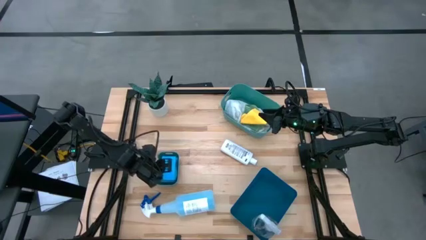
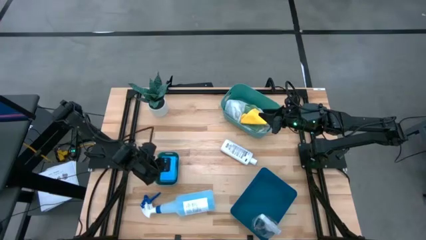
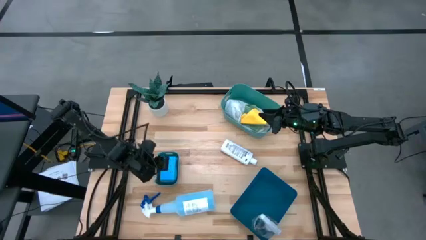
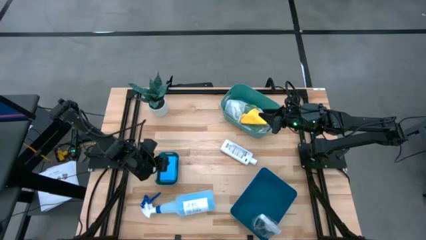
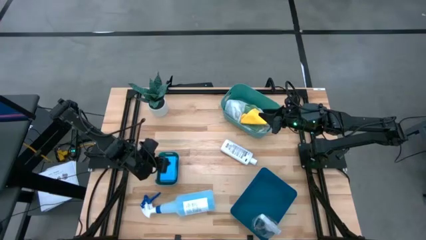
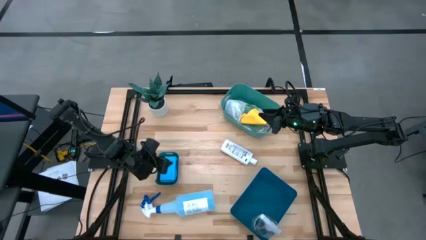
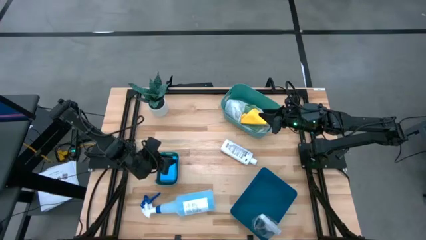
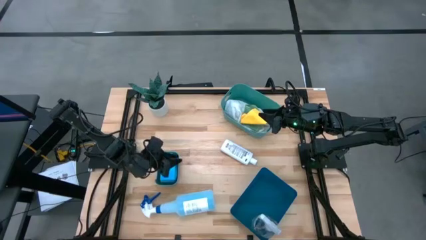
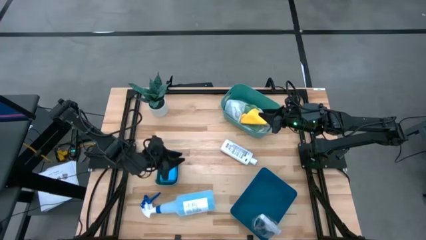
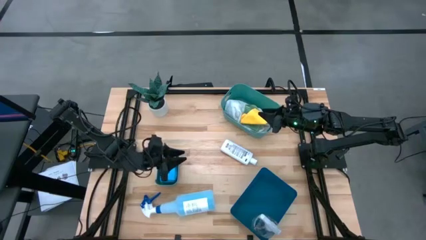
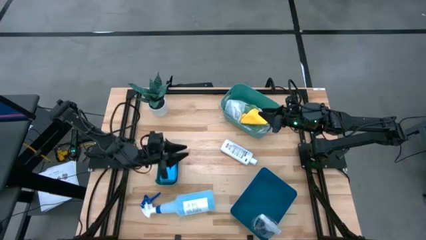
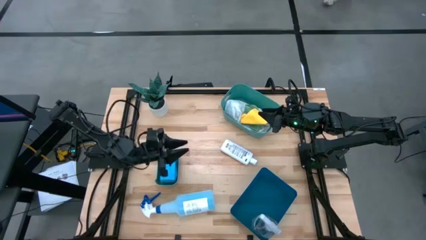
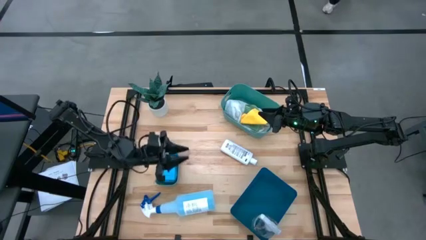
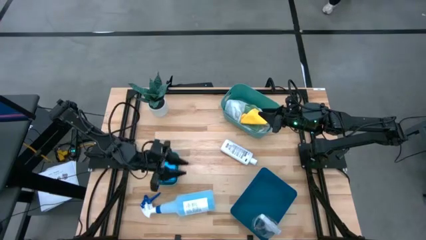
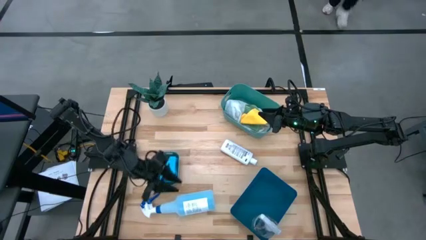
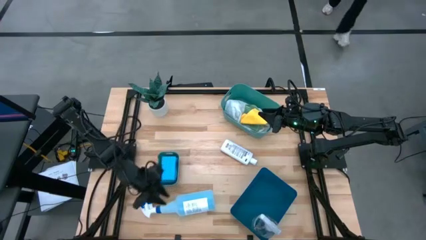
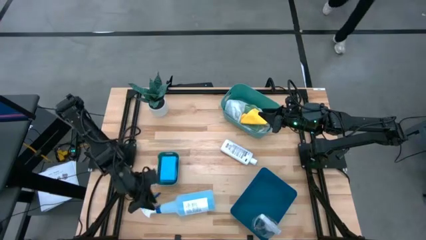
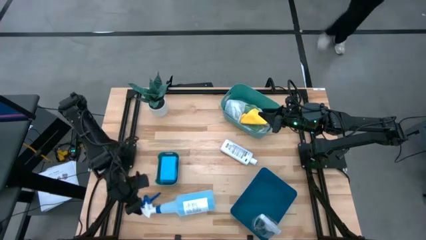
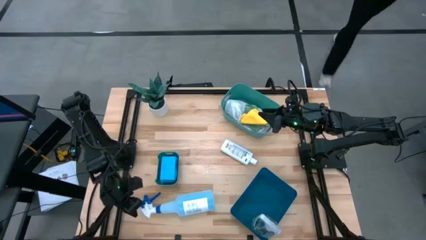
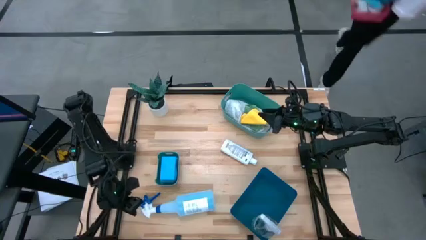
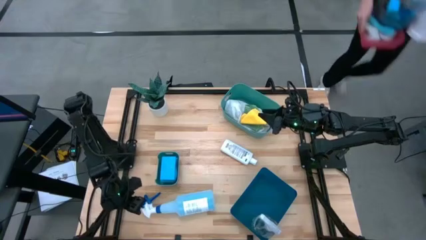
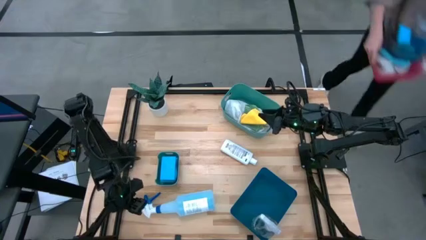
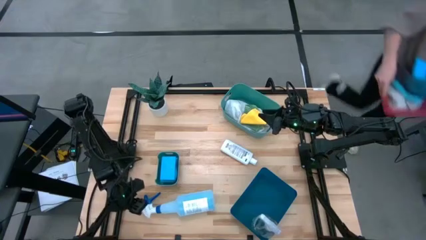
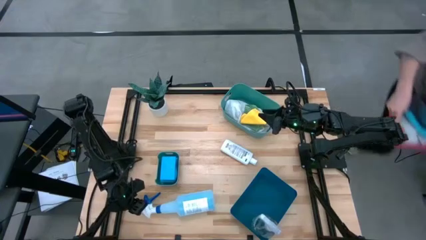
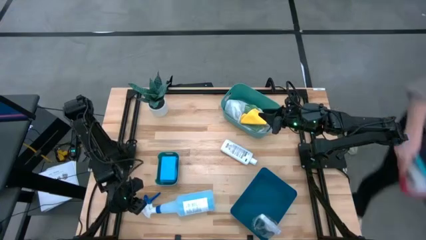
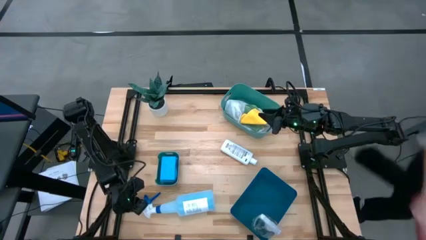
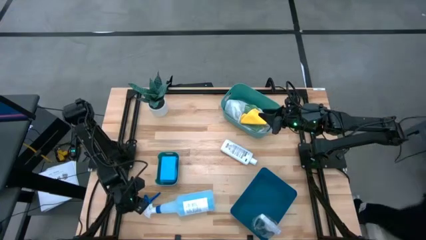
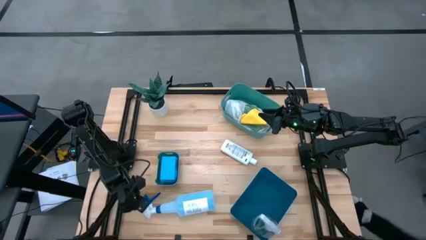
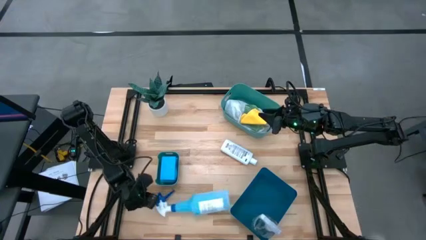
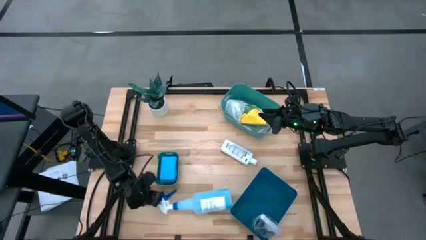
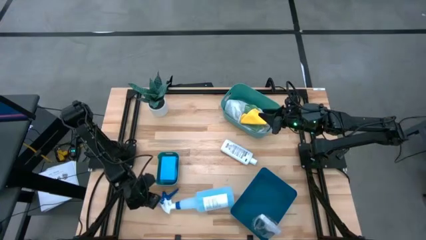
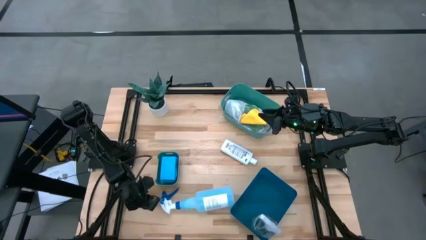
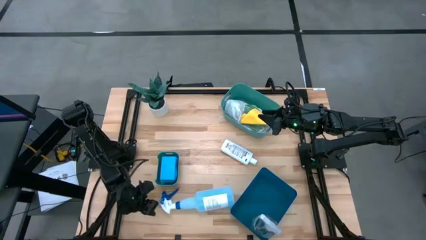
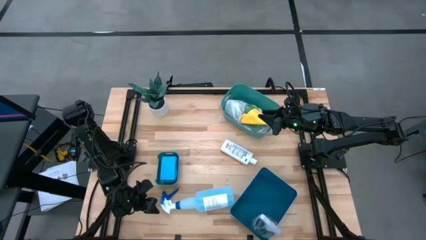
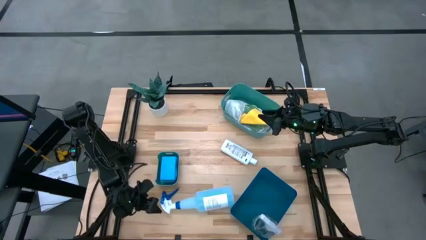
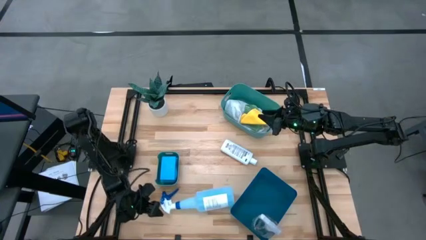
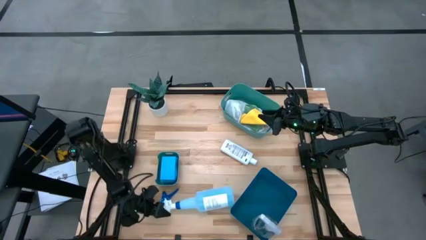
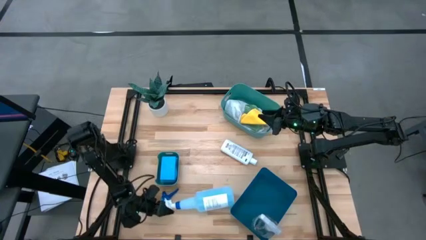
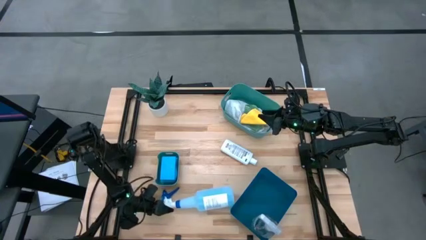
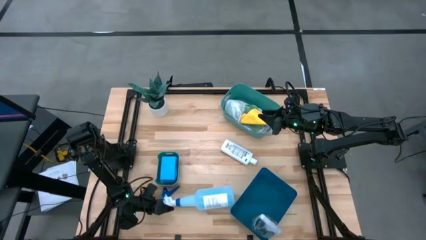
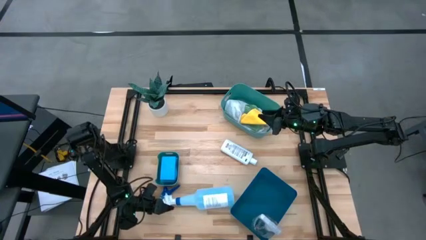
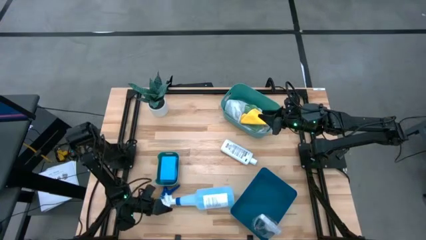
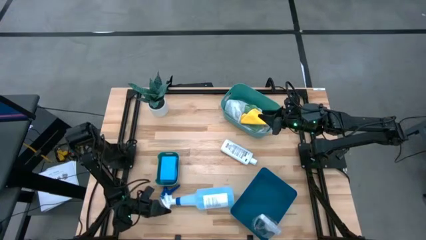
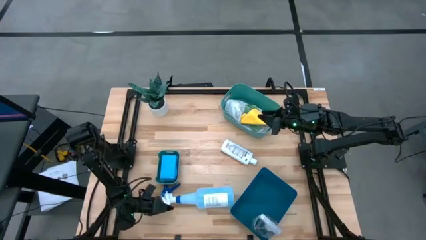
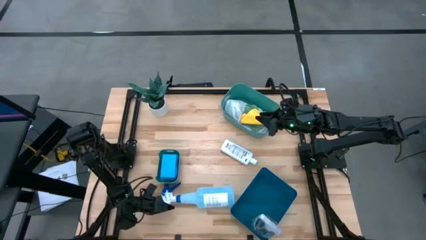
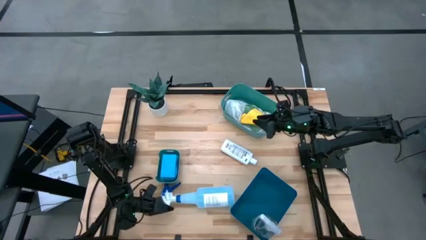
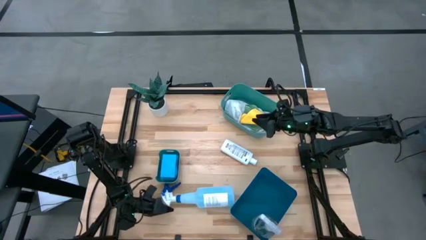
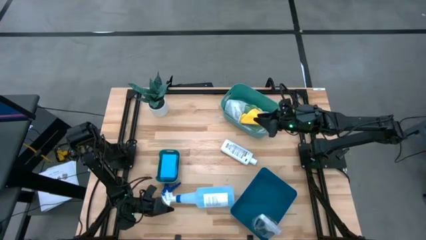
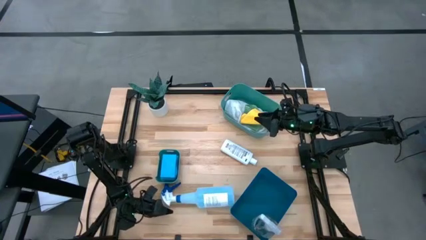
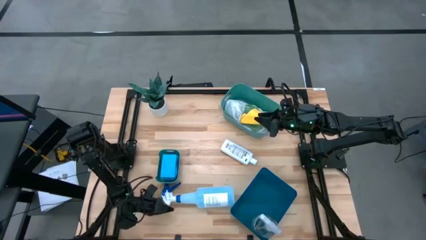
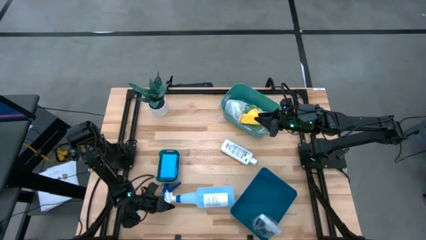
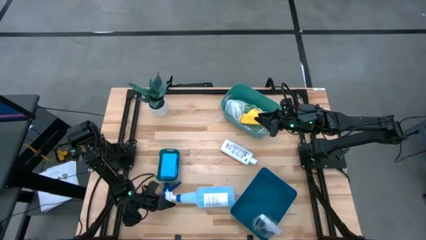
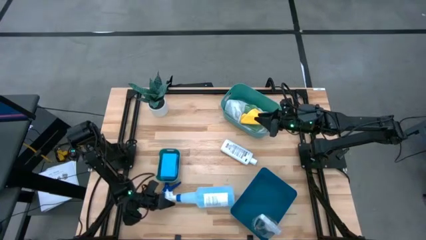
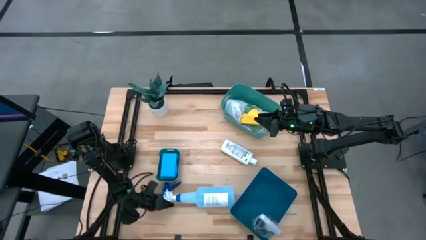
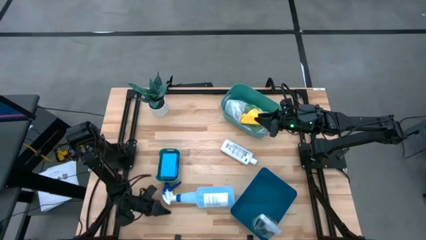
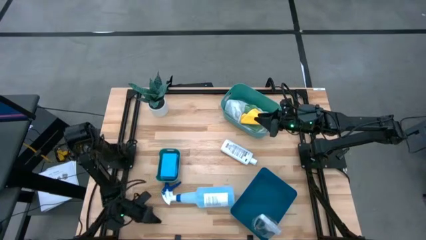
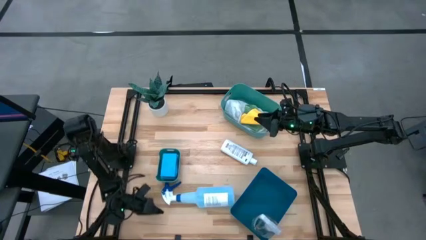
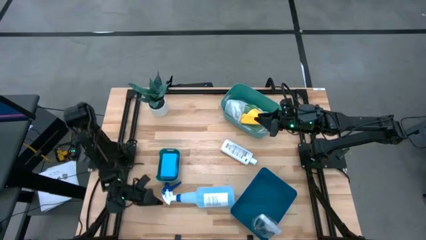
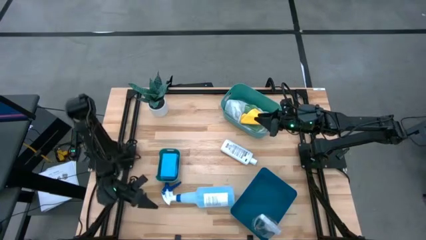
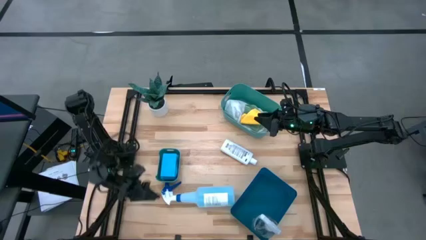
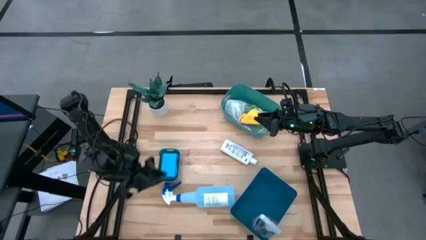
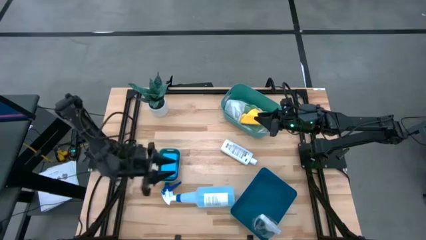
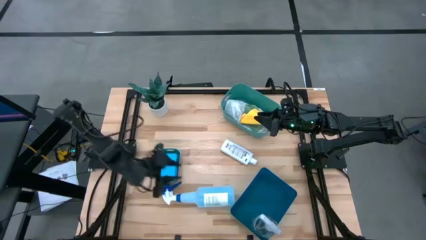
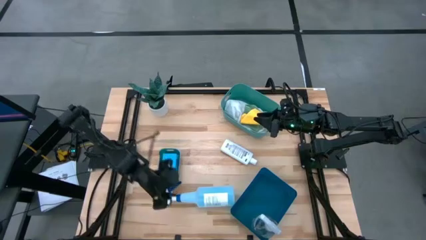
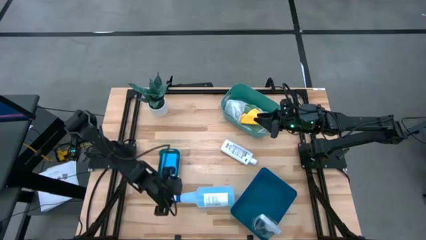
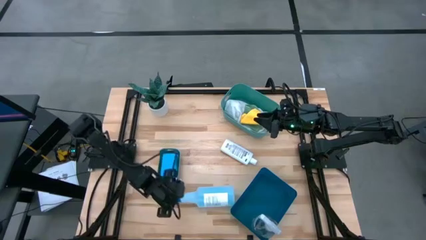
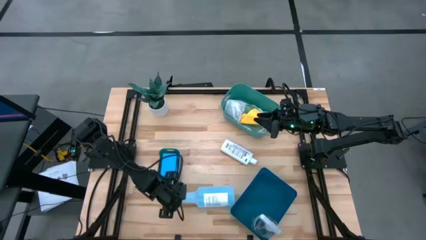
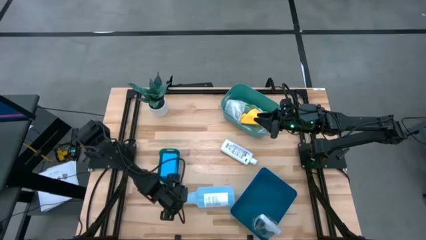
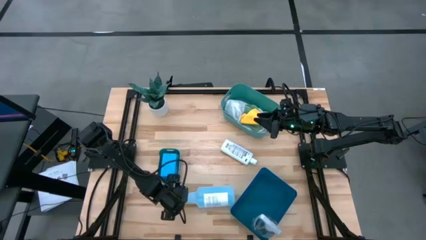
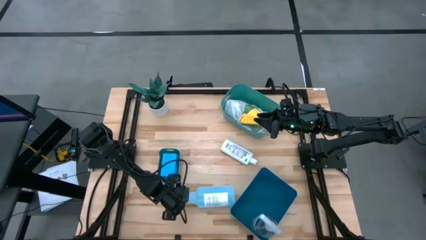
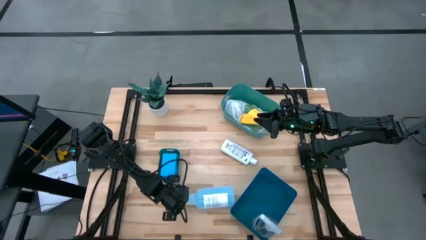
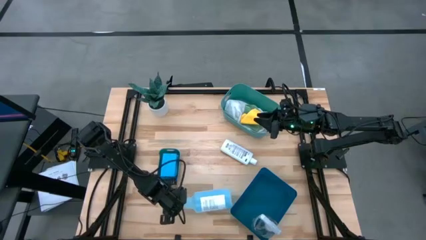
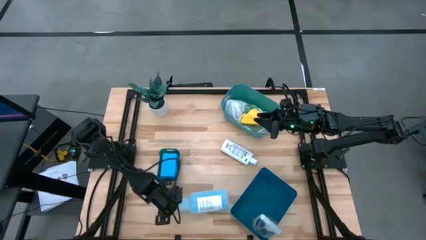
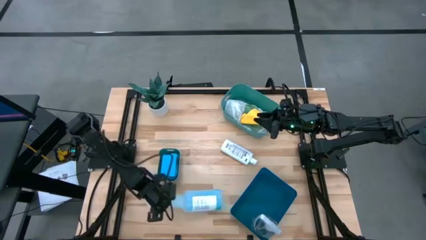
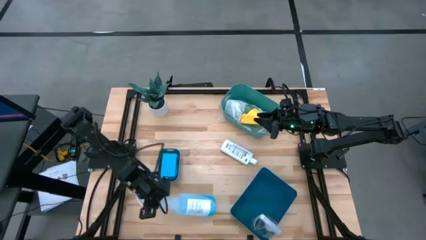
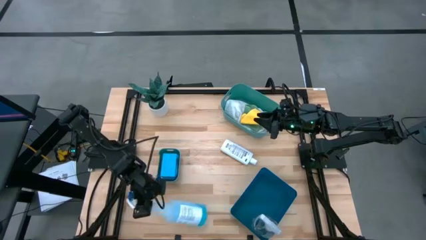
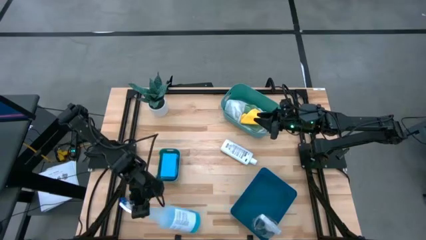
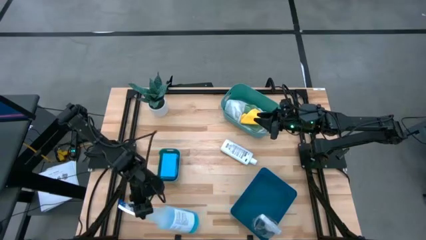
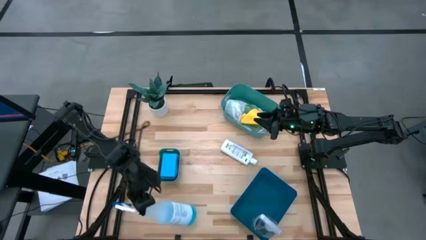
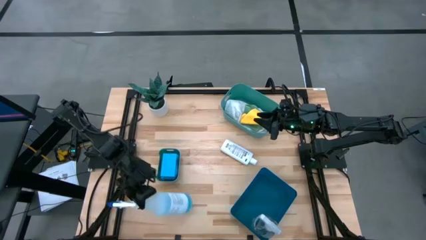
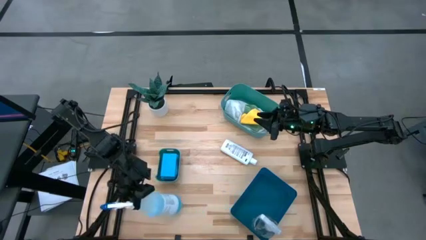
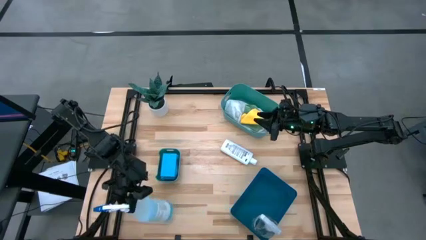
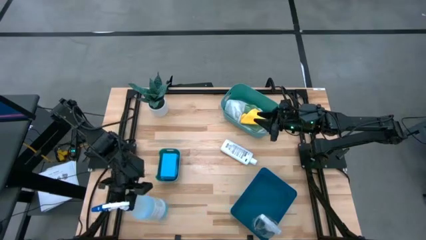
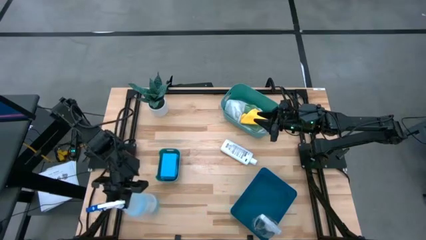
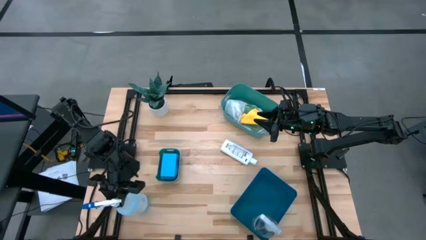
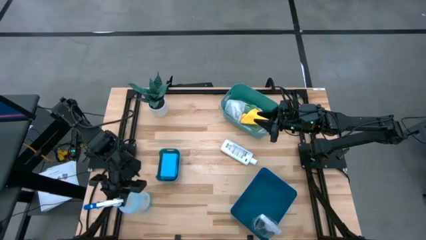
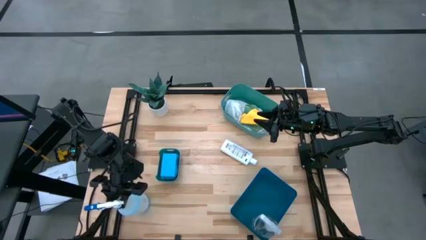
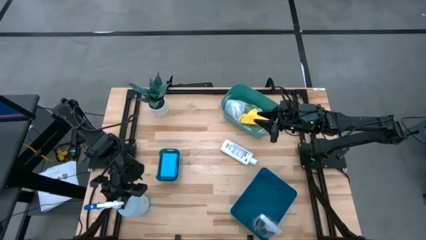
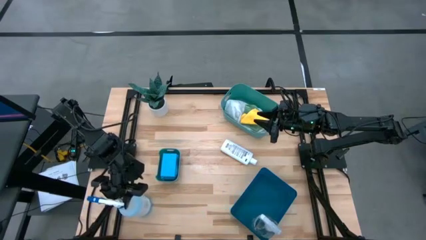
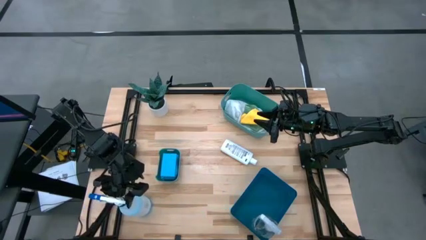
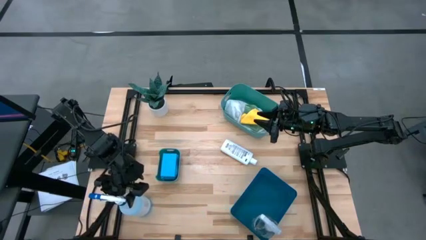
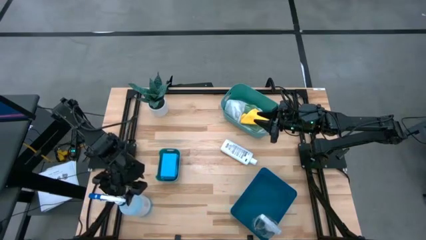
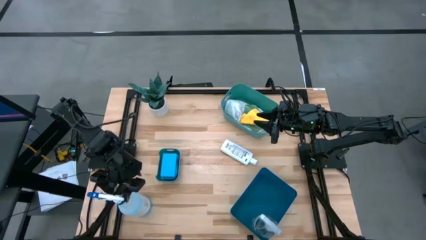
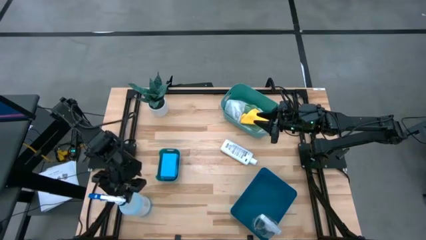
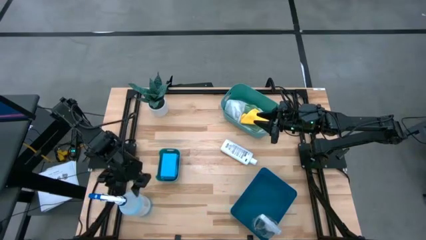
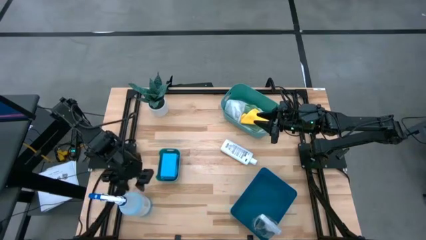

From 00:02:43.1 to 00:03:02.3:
Task: Pick & Place Kitchen Items
Put the blue spray bottle into the blue bin
